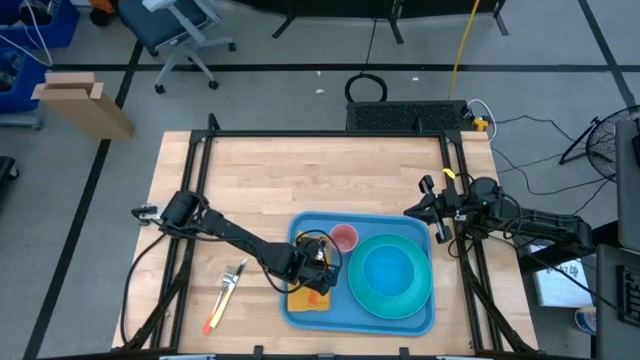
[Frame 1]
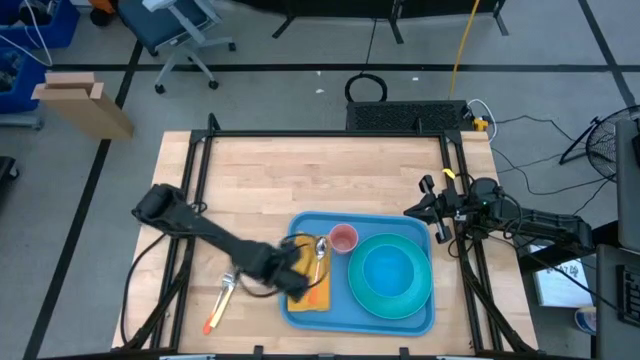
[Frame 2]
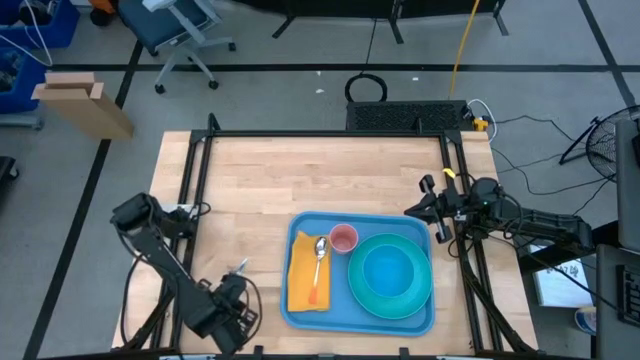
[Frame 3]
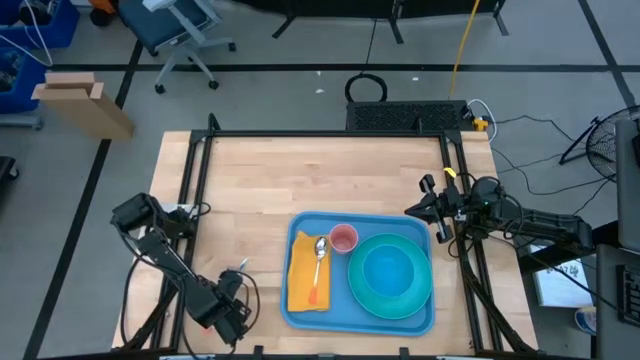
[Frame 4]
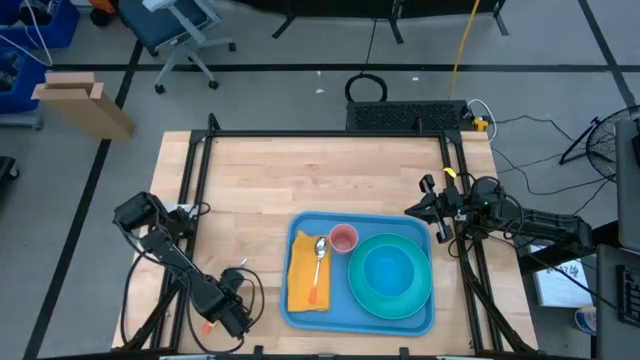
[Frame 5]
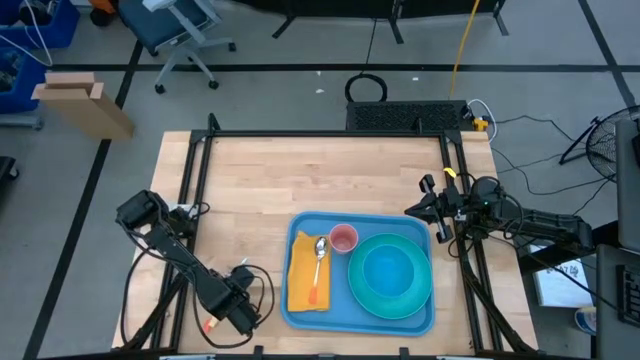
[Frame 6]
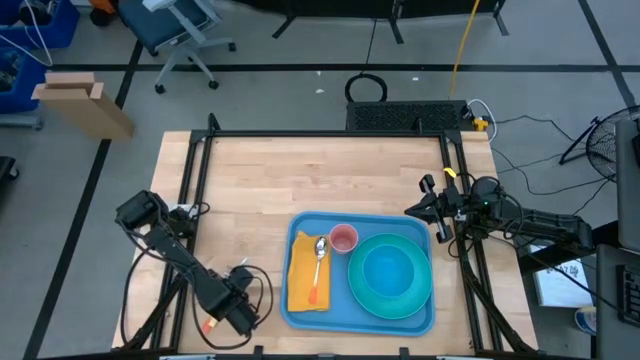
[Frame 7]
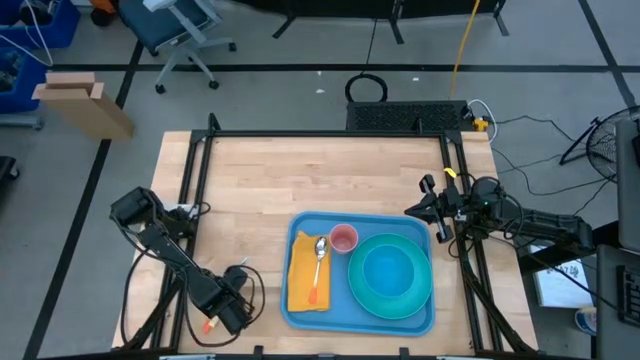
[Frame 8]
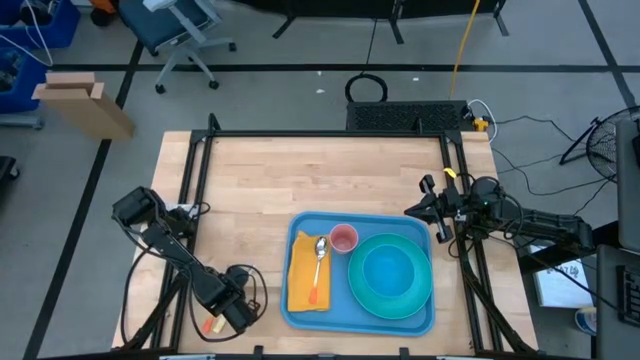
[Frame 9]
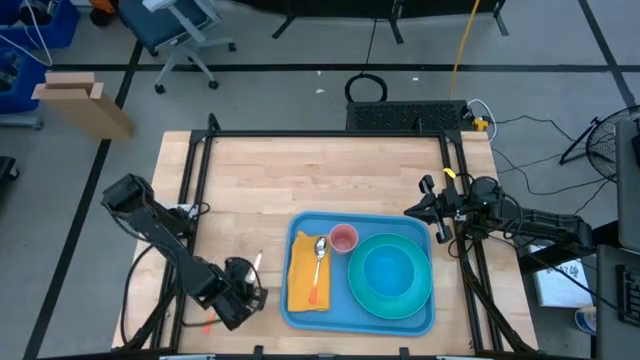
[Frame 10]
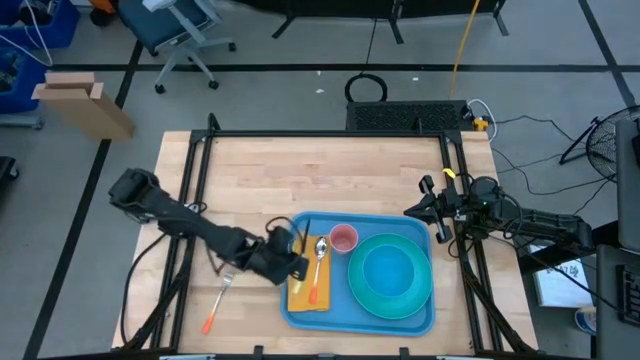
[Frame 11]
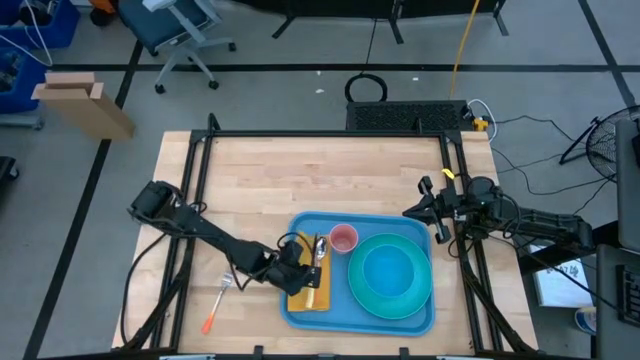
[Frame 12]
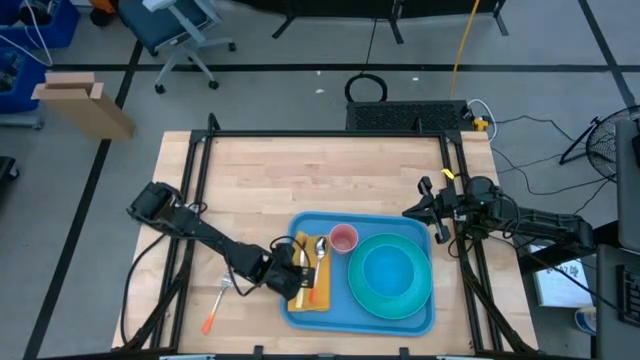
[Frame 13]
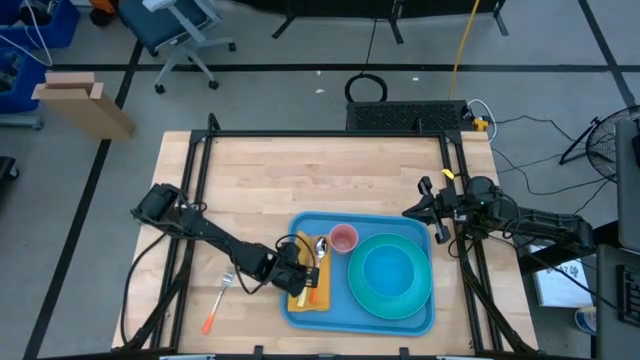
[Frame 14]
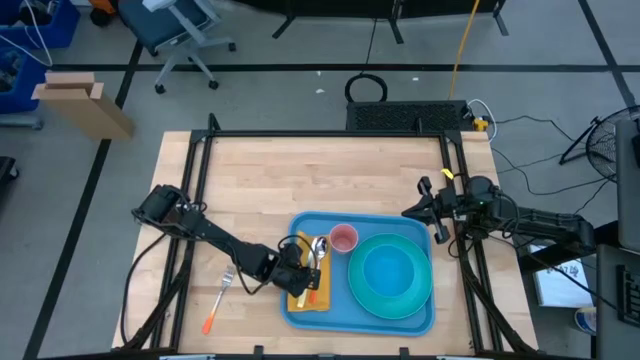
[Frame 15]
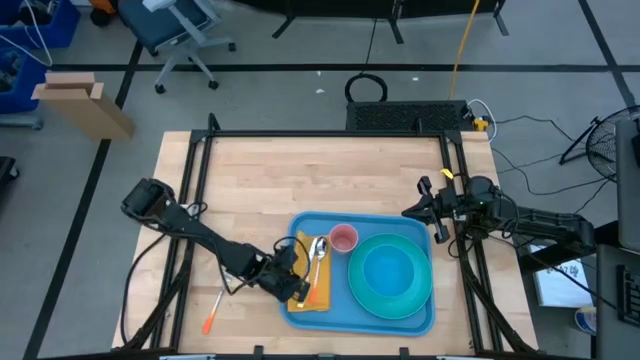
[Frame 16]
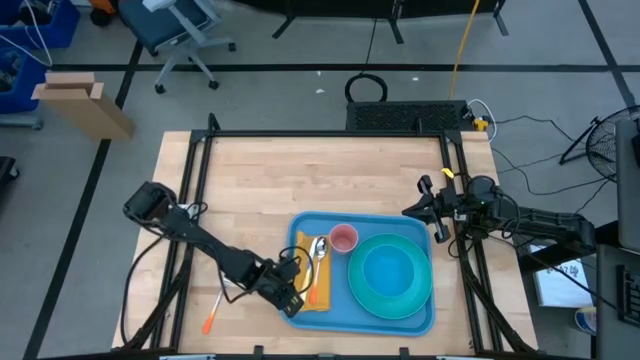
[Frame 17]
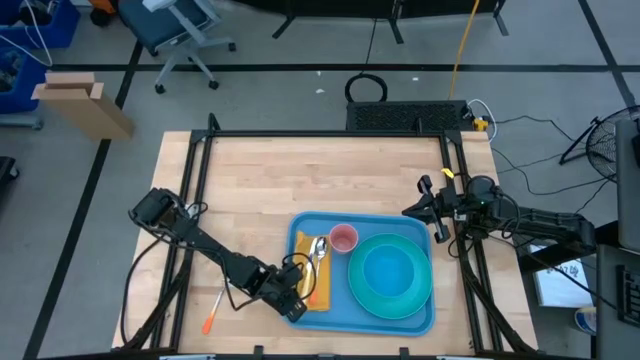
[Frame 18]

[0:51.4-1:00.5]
Task: Set up tray
Put the yellow table knife on top of the yellow table napkin to the left side of the orange spoon

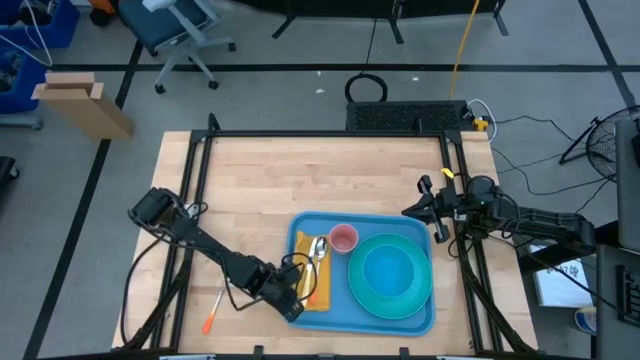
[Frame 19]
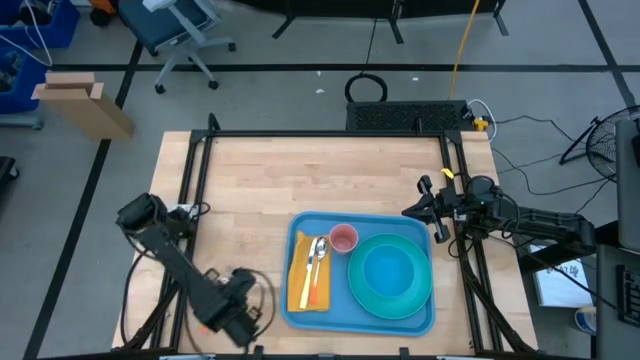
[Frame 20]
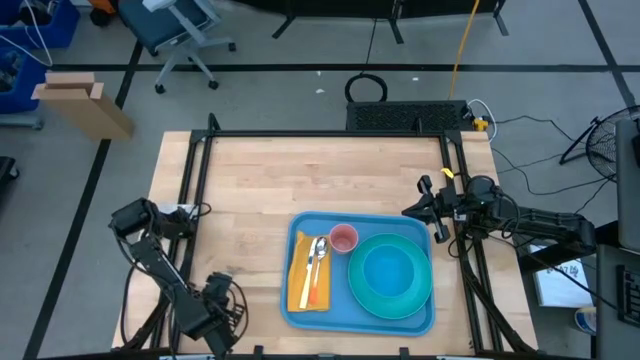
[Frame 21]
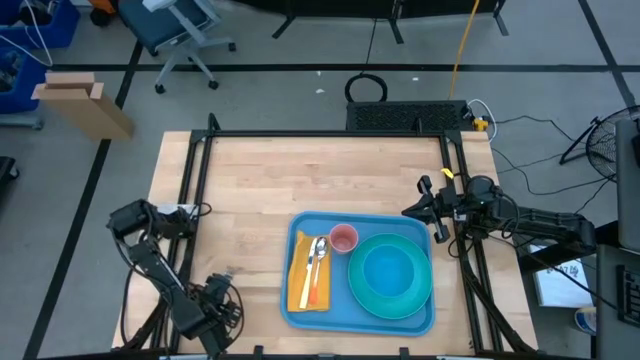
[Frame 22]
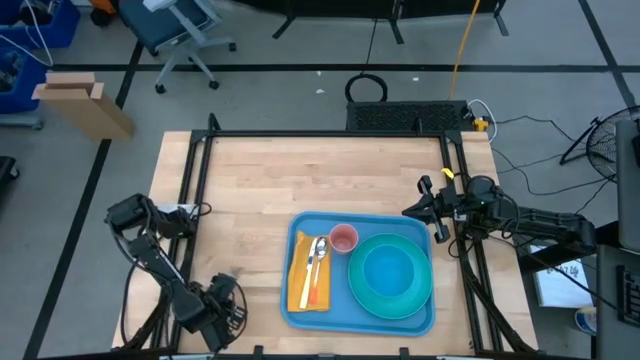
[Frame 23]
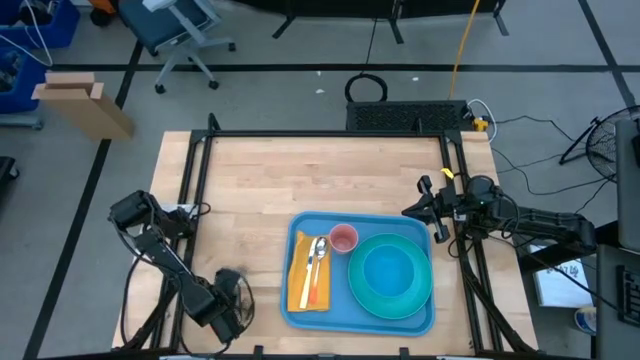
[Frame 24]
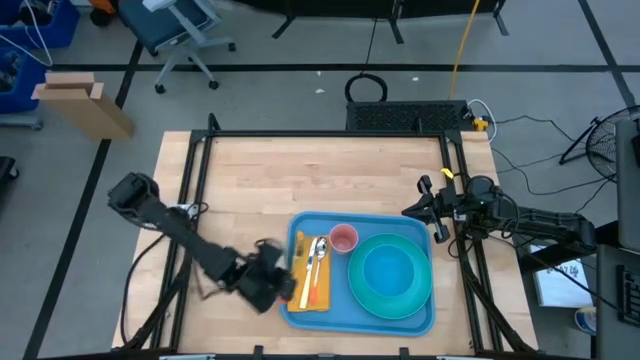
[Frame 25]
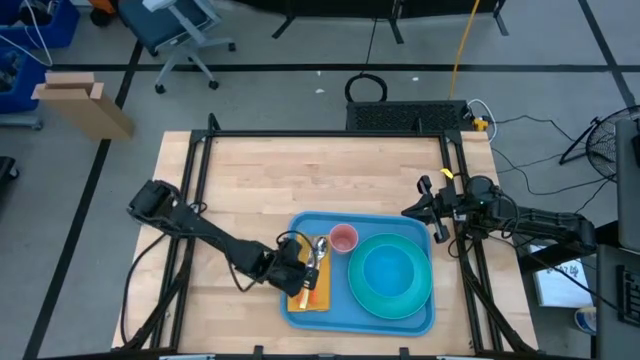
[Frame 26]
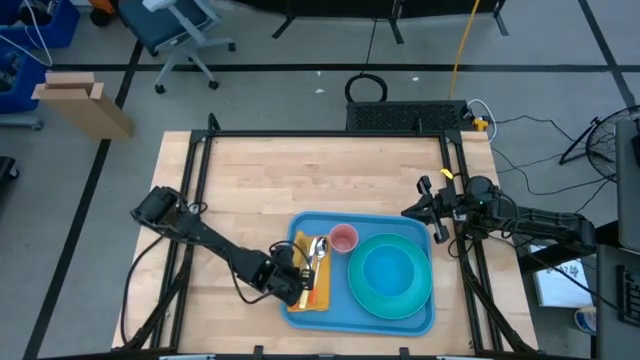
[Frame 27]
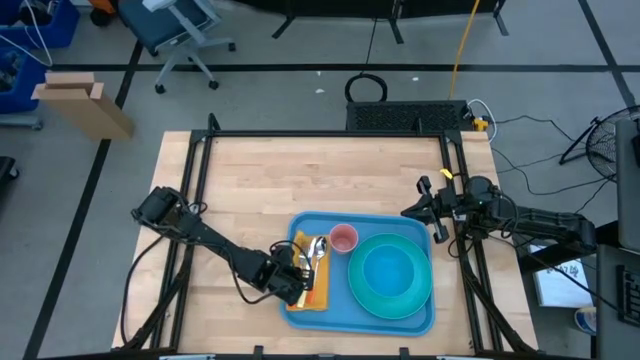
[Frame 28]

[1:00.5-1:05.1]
Put the orange fork on top of the yellow table napkin to the left side of the yellow table knife

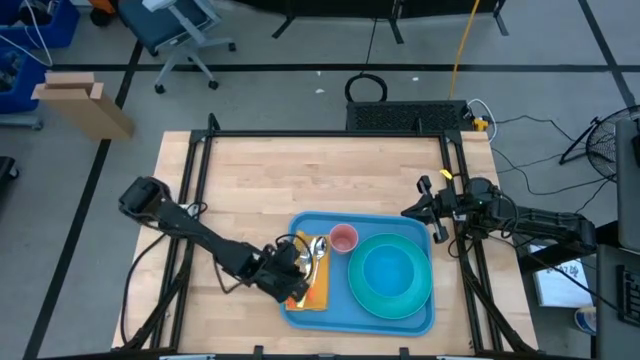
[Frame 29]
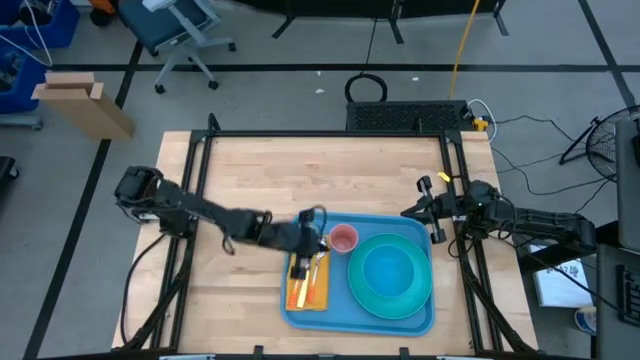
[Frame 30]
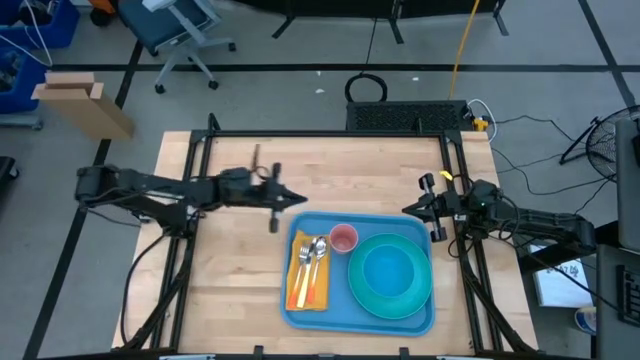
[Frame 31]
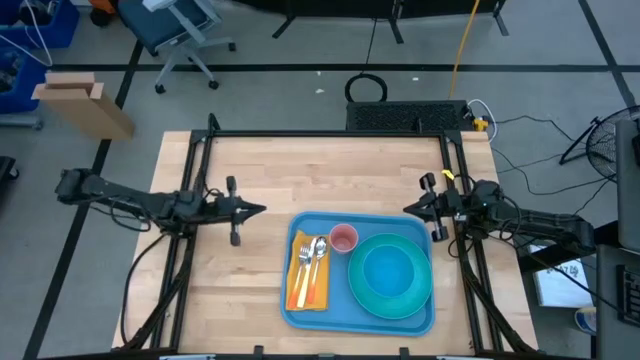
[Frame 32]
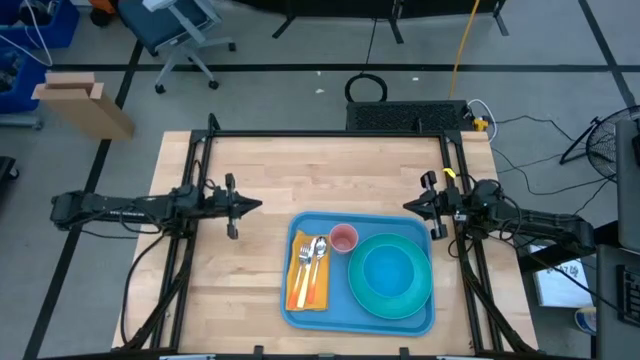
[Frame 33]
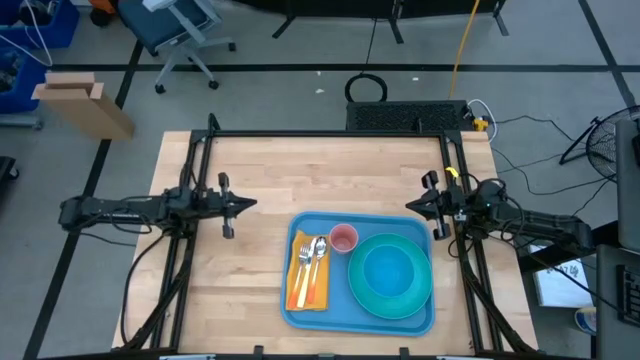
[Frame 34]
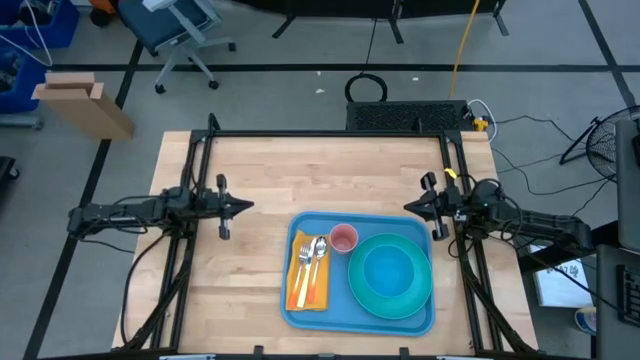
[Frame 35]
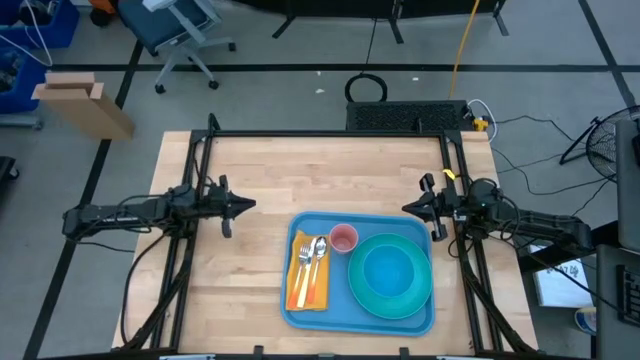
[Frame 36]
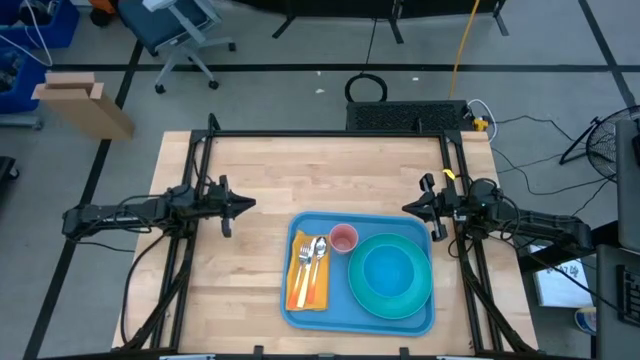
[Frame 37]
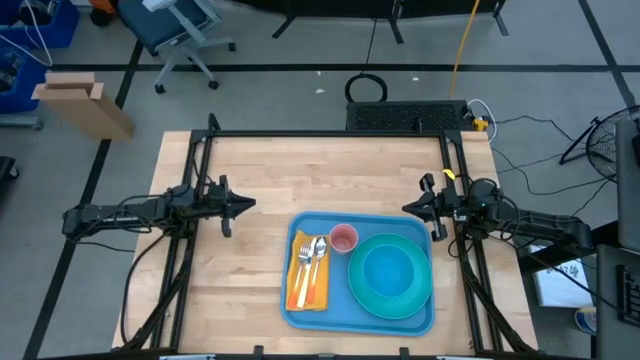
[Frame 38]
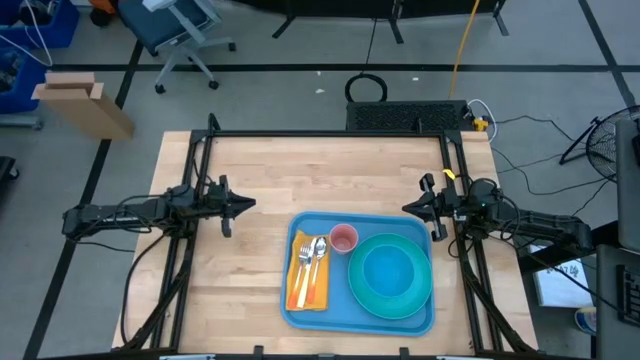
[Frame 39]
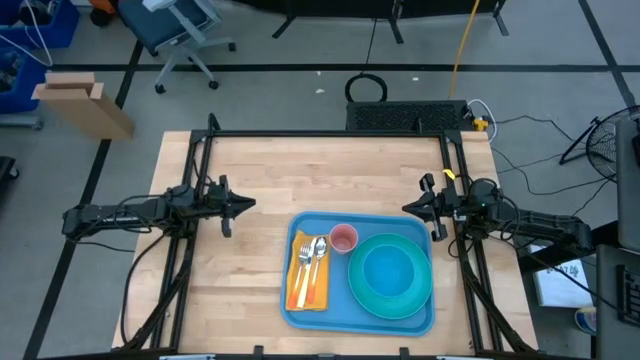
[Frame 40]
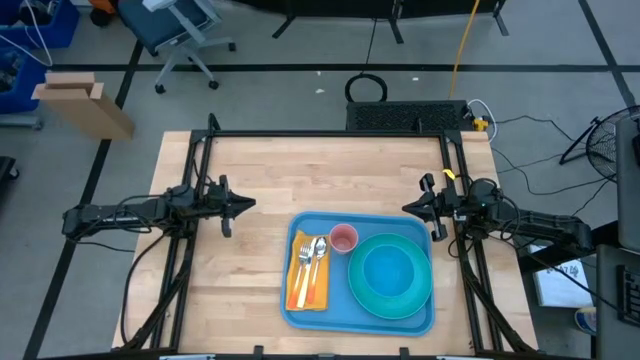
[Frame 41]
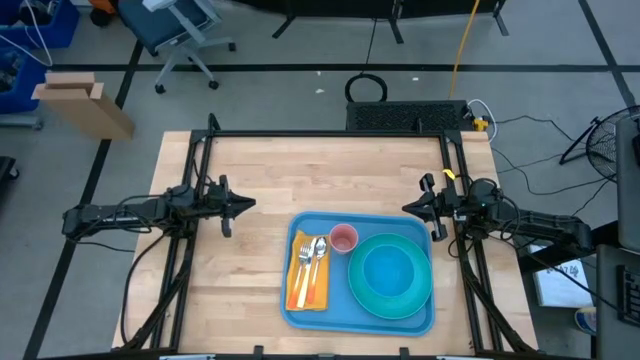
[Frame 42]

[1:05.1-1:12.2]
Return to Home Position

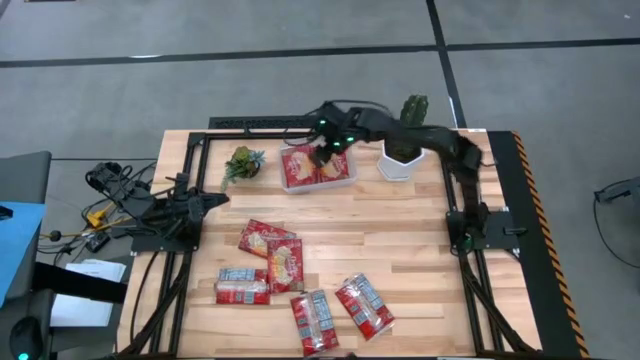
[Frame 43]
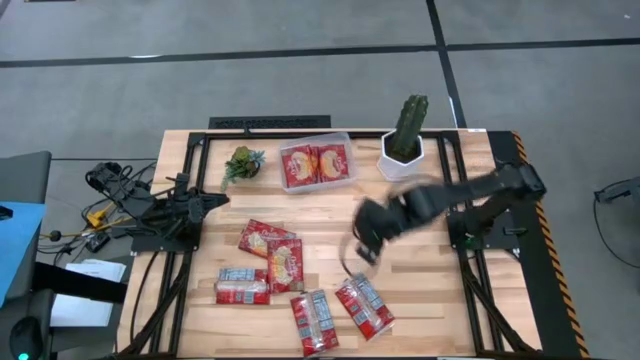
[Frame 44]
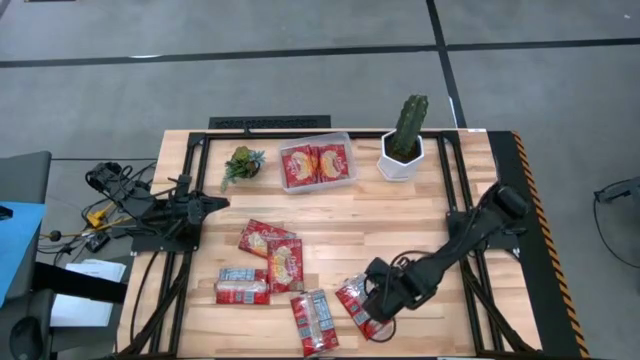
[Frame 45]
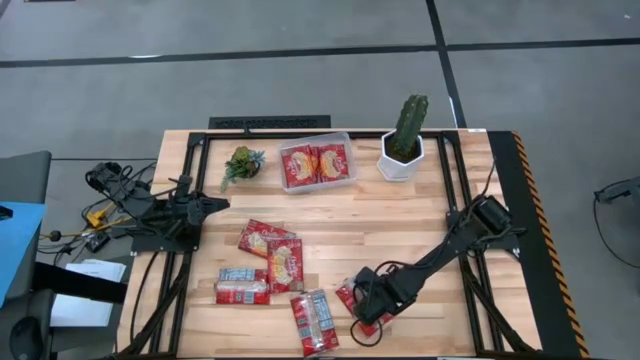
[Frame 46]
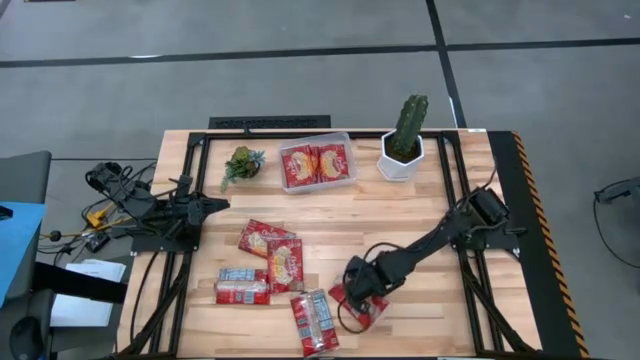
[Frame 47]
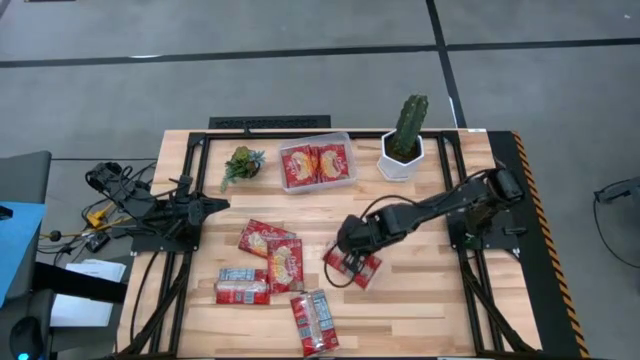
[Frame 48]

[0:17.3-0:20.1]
Task: Sort popcorn bags into baskets
Put the red popcorn bag into the transparent bin
